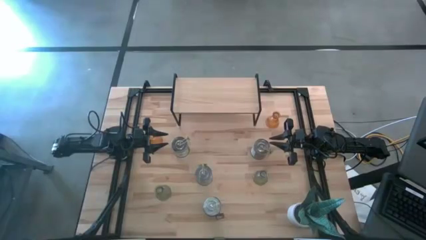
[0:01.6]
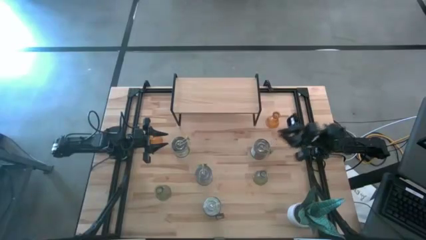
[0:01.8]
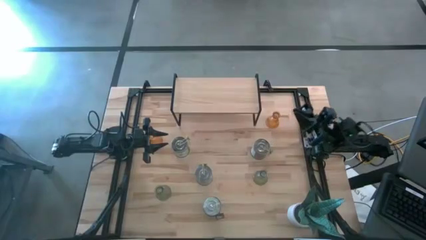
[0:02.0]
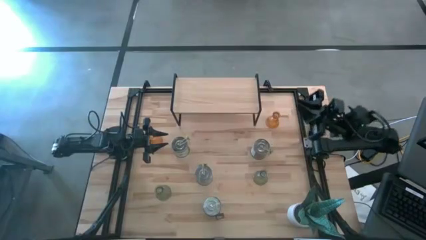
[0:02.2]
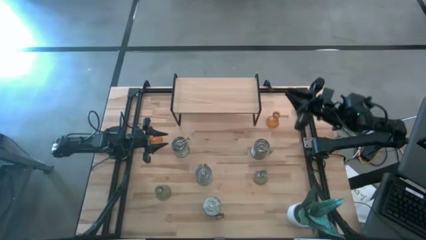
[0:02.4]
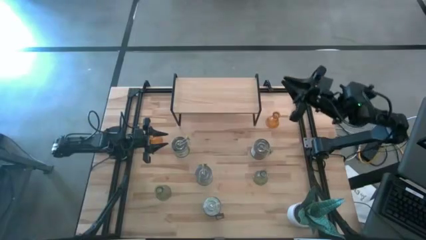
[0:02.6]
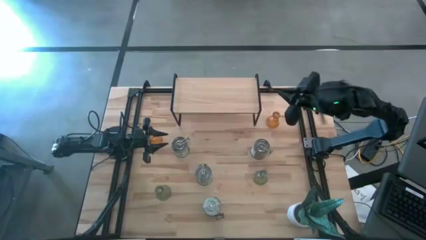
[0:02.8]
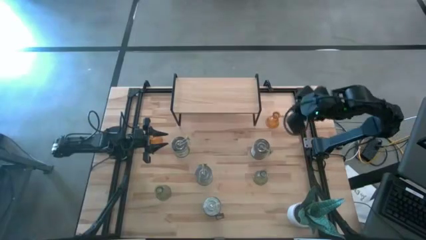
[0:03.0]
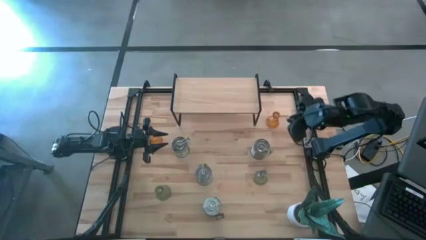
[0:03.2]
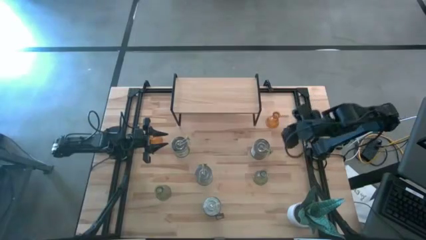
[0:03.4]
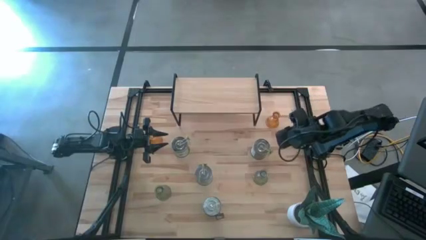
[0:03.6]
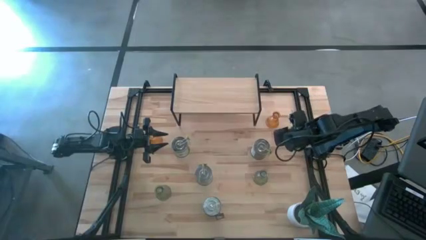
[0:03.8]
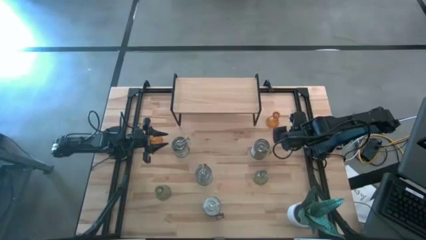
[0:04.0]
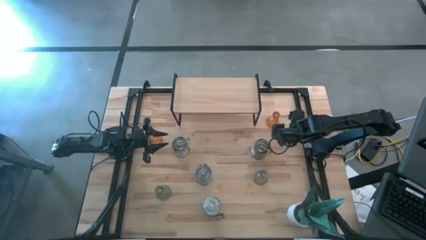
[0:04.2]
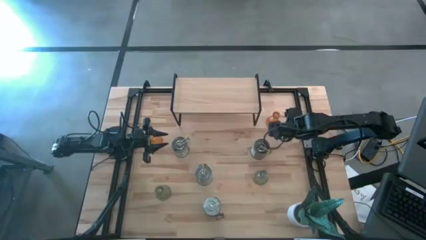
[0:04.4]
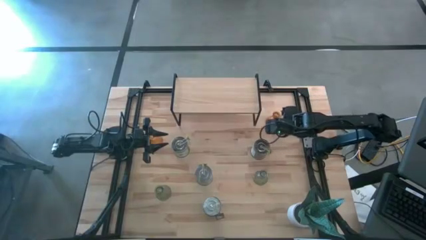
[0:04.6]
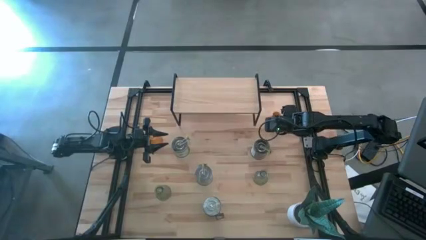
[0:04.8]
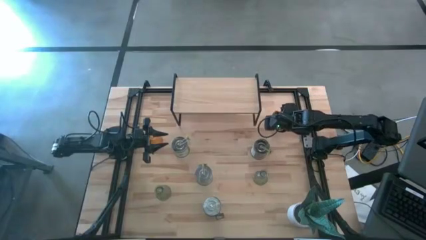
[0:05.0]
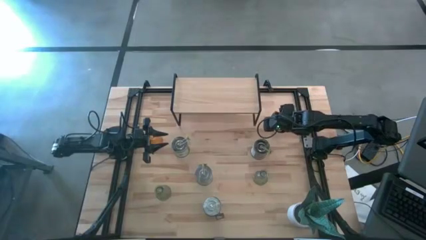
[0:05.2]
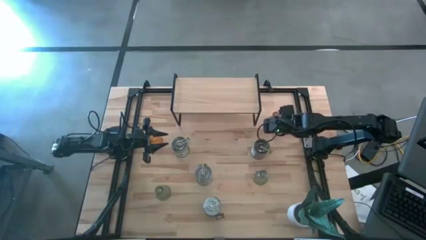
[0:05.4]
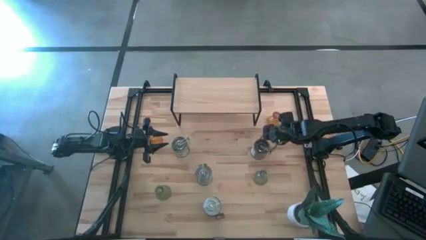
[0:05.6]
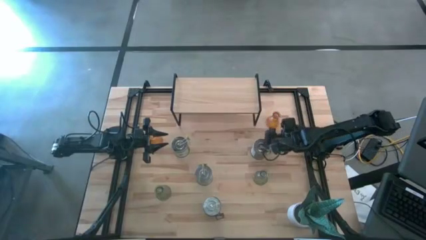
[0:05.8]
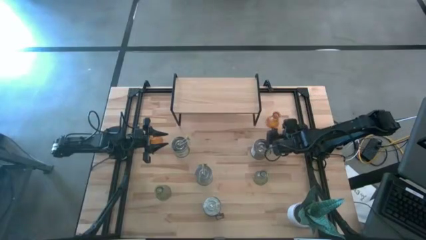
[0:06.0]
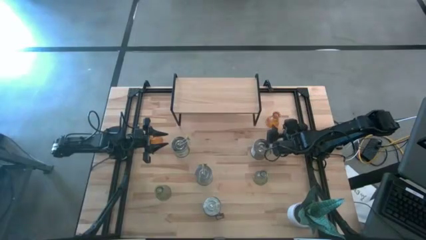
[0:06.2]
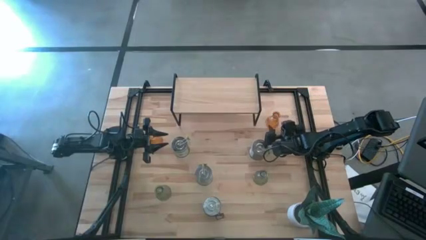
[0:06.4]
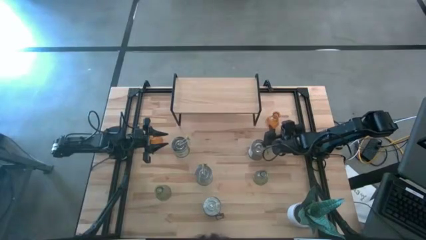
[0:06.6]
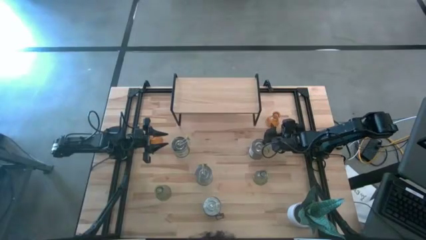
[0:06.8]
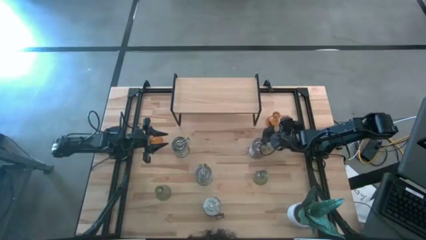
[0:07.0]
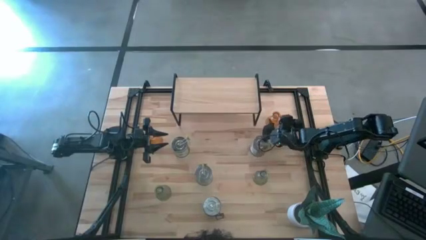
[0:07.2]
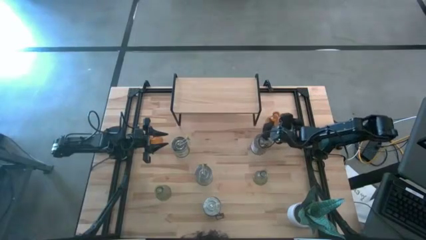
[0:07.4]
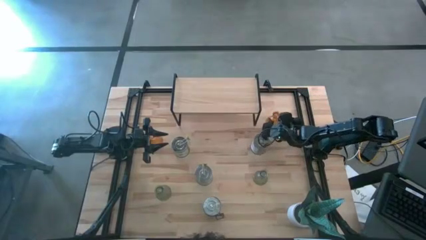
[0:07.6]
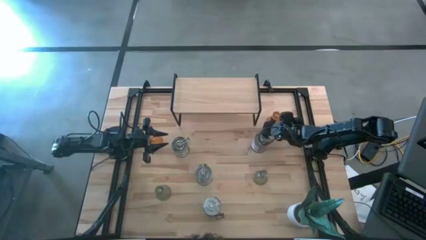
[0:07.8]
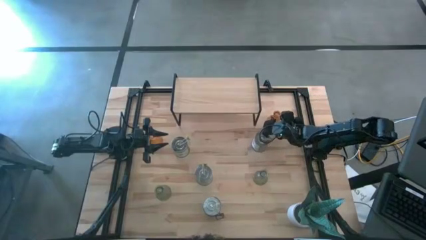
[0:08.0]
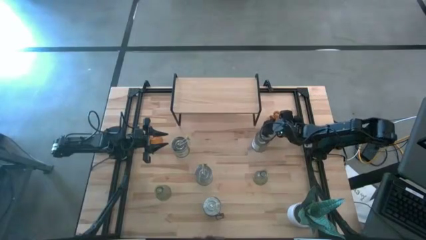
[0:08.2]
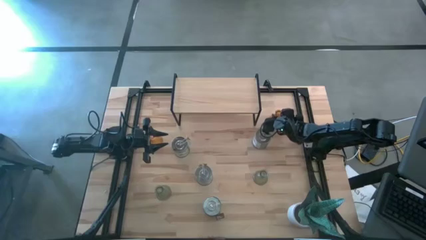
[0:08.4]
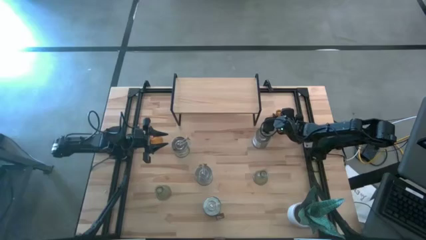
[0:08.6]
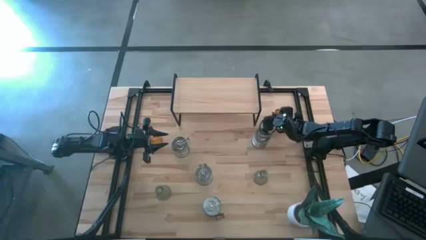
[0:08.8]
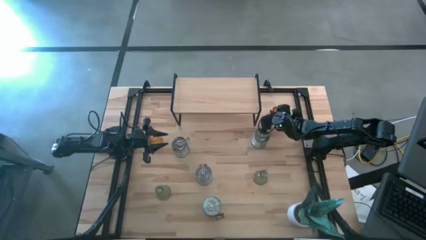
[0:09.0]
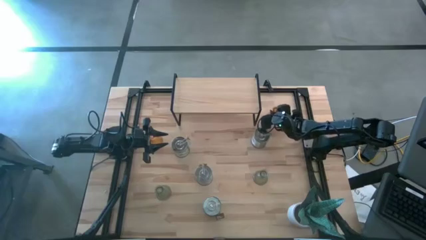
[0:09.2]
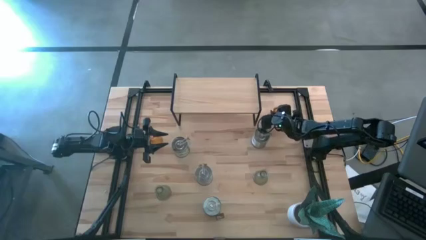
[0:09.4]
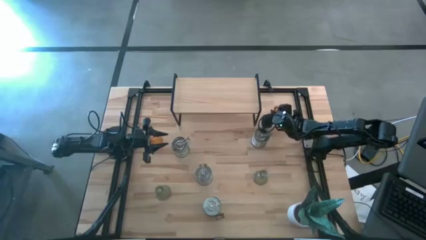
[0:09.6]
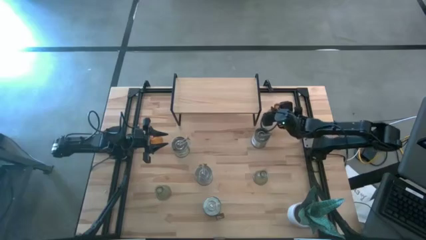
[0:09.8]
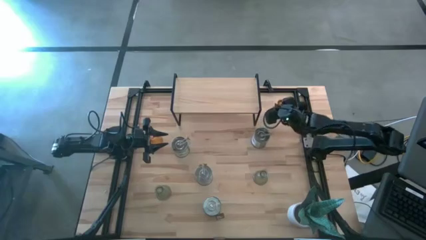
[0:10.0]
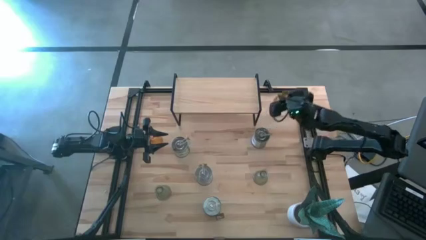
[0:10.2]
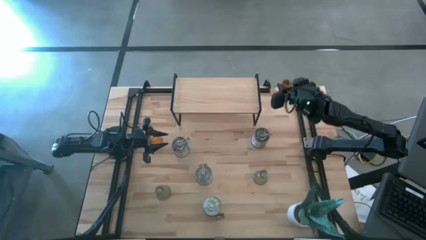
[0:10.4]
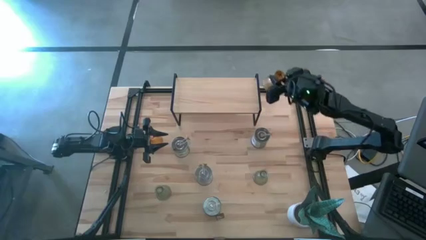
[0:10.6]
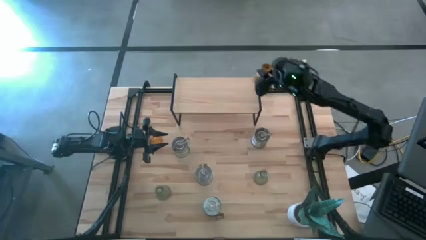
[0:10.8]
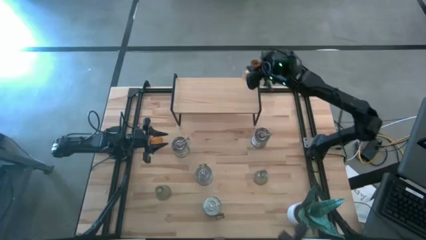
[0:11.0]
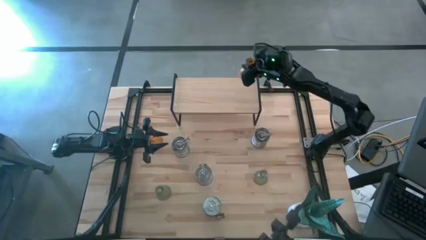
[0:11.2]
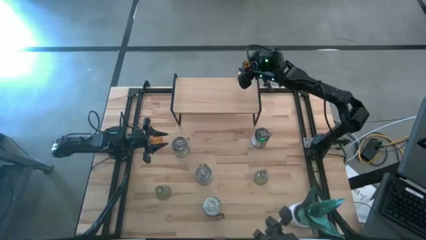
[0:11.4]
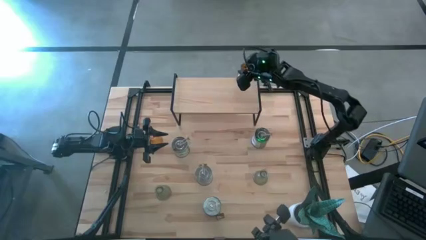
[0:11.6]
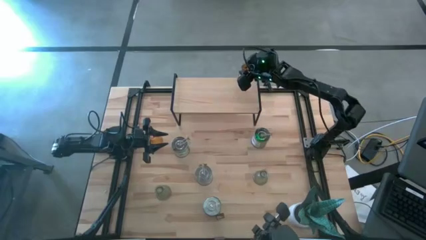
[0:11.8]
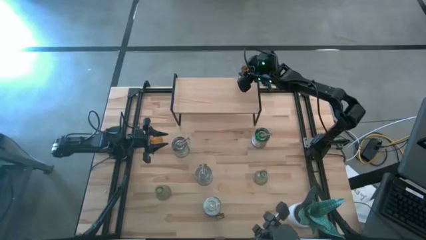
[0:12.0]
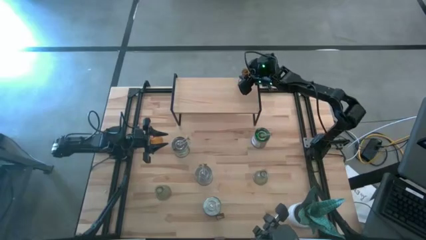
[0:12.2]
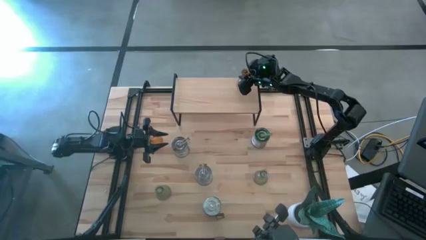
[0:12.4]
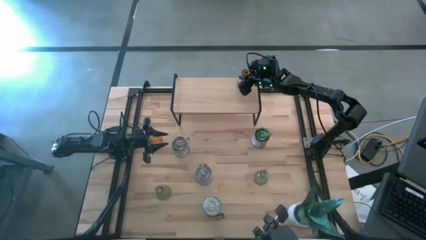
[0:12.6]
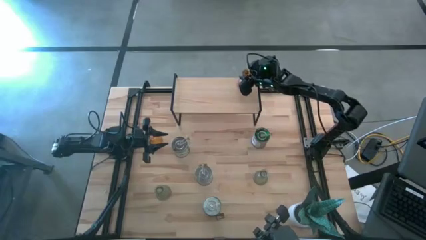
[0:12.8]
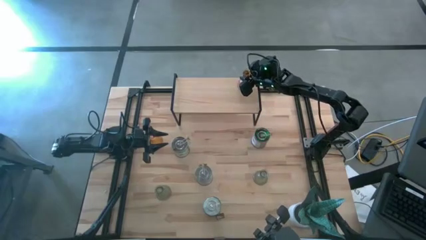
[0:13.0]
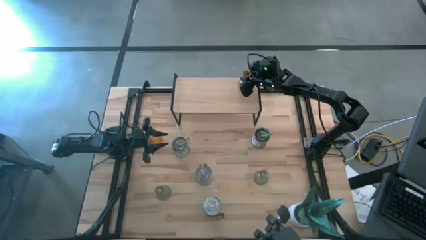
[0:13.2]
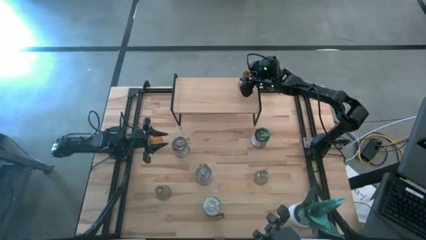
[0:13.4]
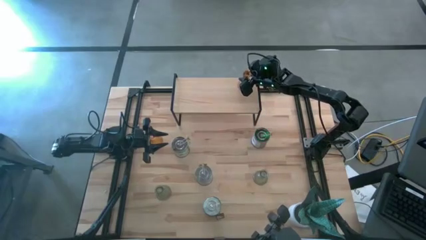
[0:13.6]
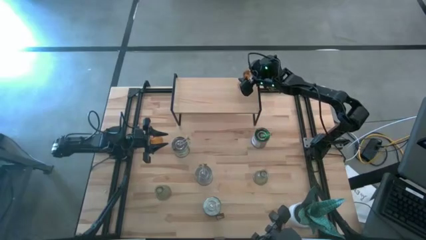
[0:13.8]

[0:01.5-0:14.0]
Task: Pick & Place candle stick holders
Put the right orange candle holder on the top right side of the shelf
